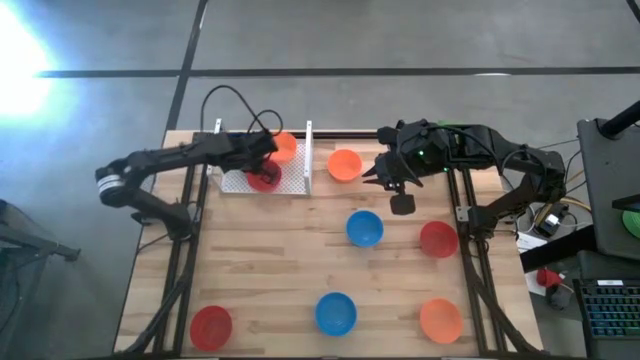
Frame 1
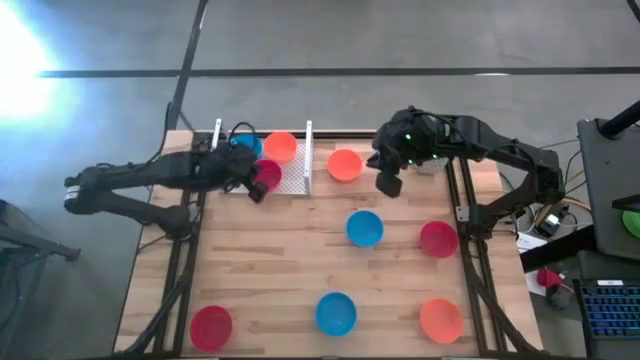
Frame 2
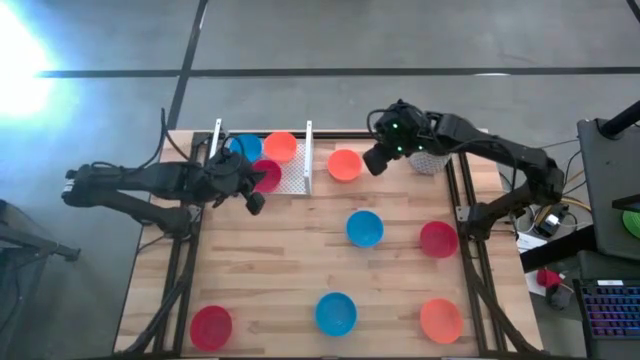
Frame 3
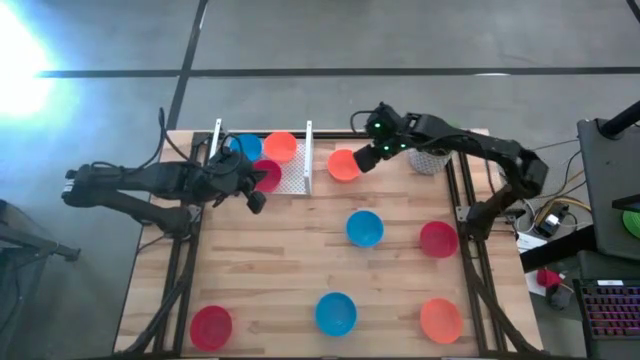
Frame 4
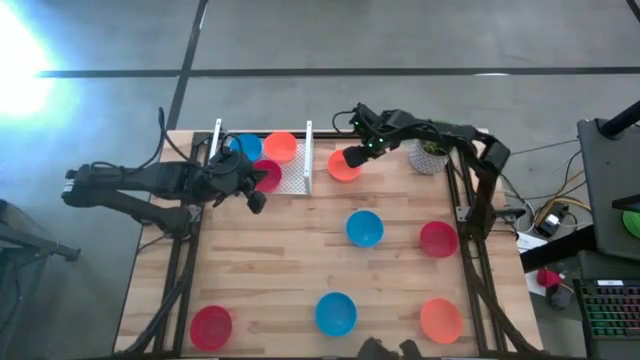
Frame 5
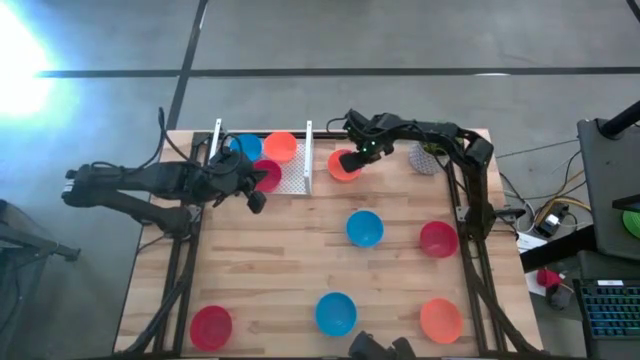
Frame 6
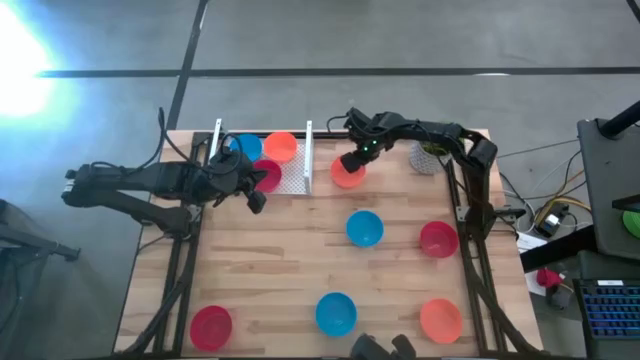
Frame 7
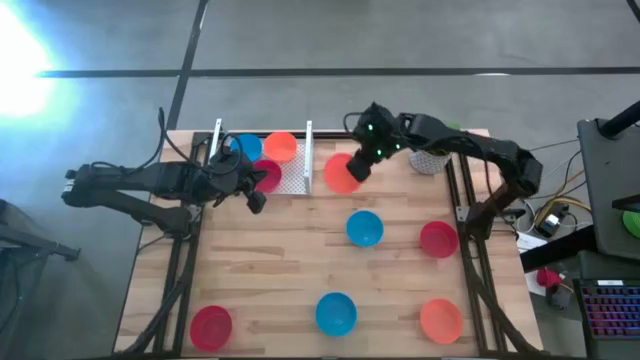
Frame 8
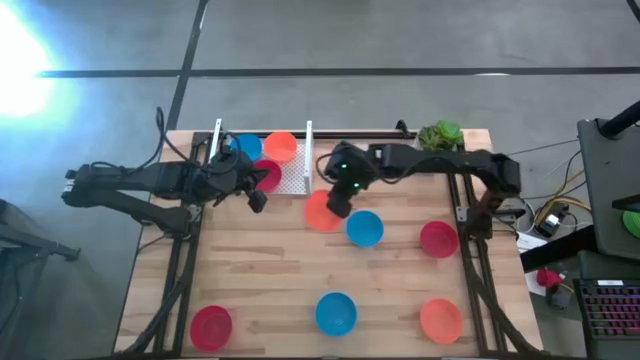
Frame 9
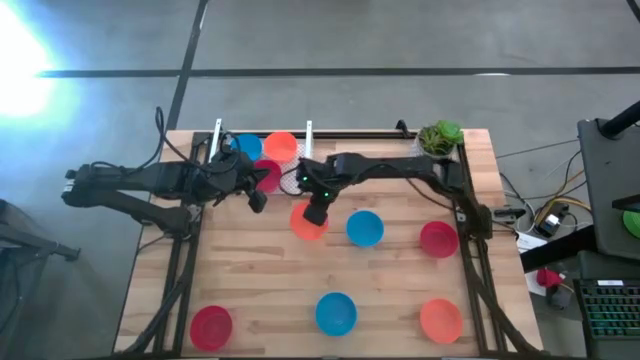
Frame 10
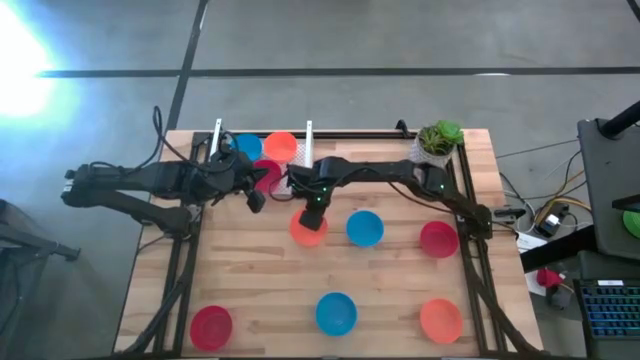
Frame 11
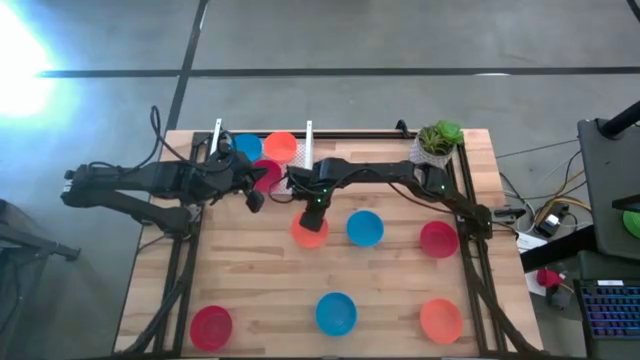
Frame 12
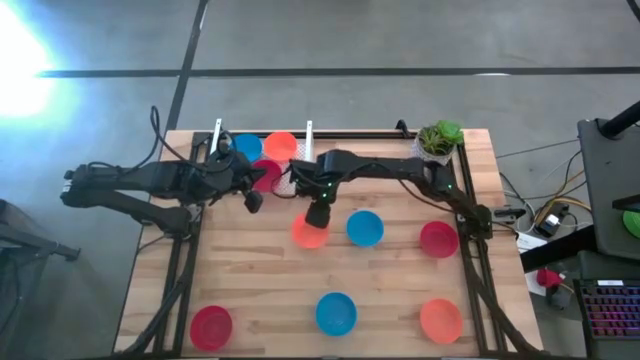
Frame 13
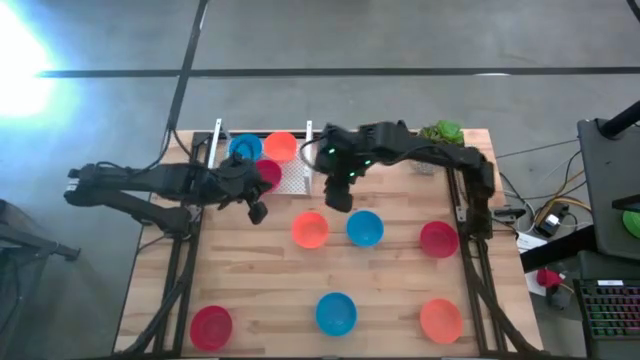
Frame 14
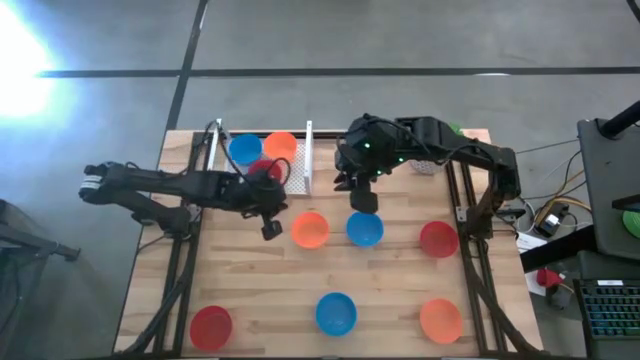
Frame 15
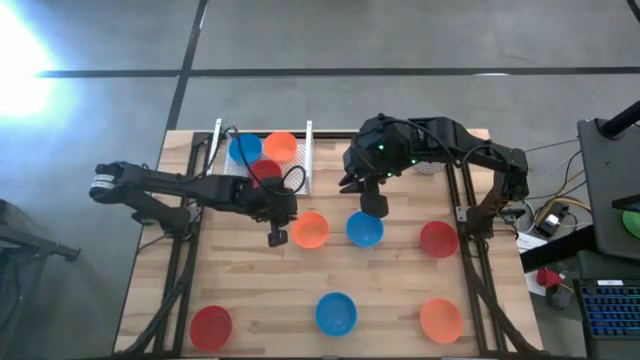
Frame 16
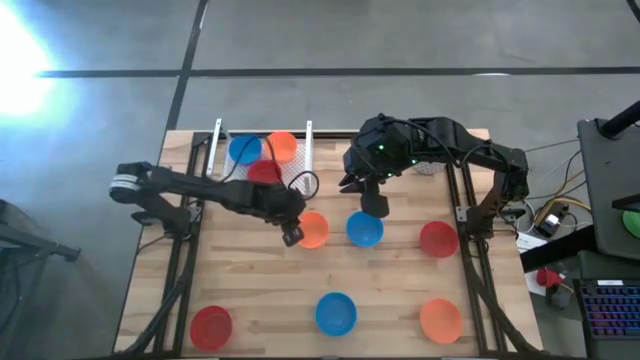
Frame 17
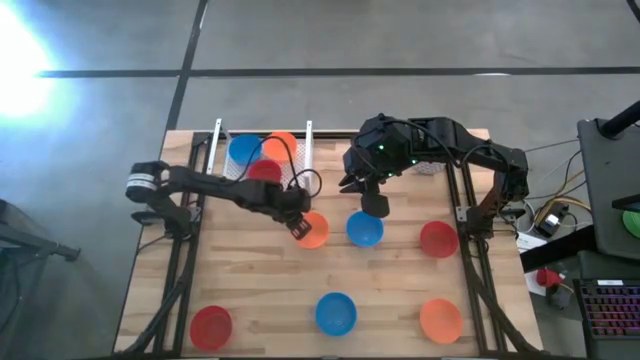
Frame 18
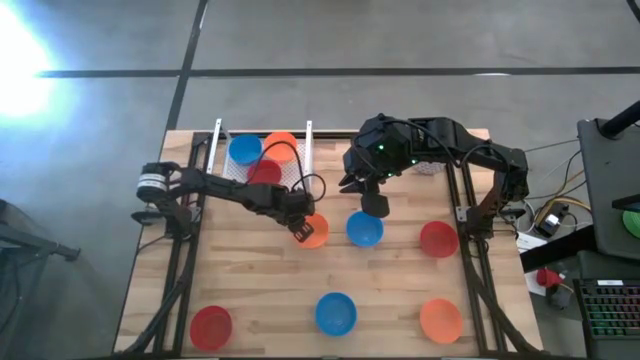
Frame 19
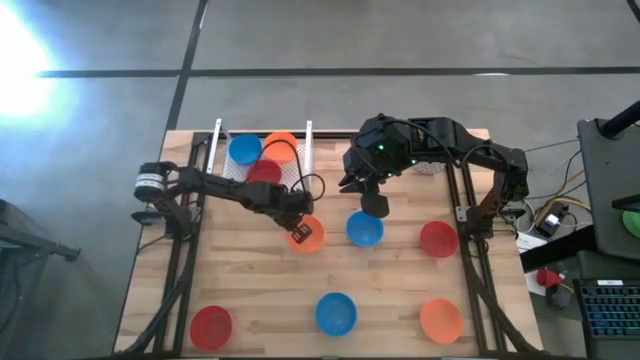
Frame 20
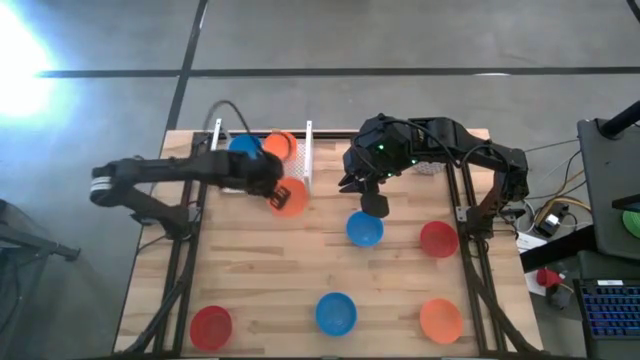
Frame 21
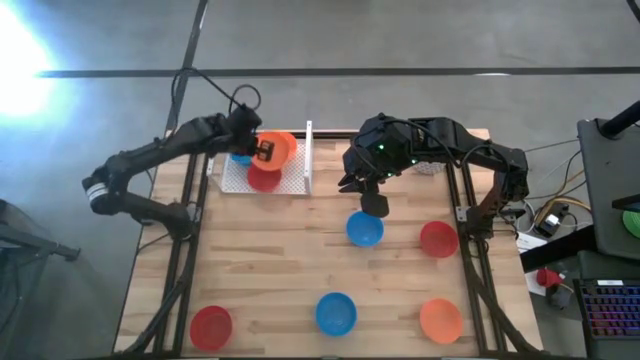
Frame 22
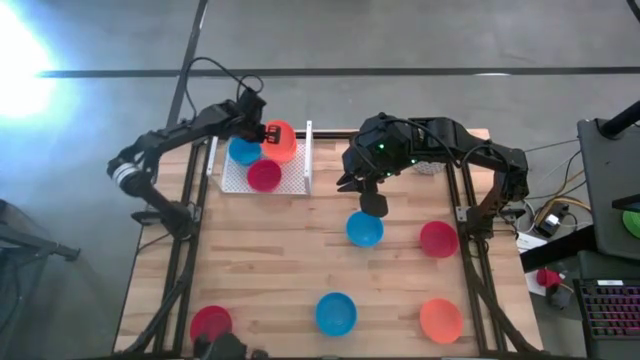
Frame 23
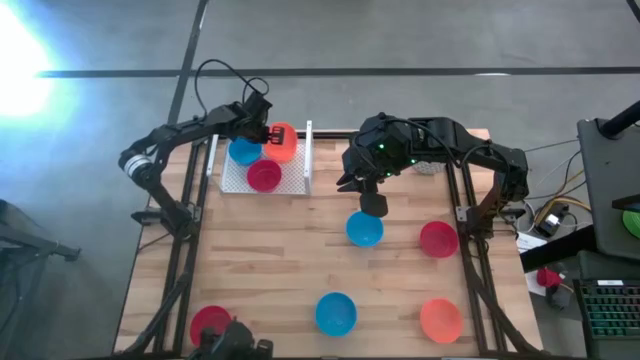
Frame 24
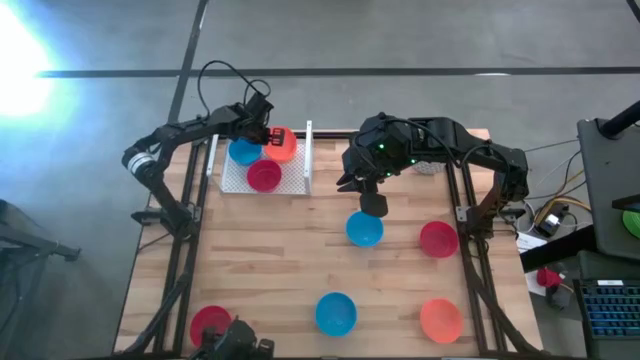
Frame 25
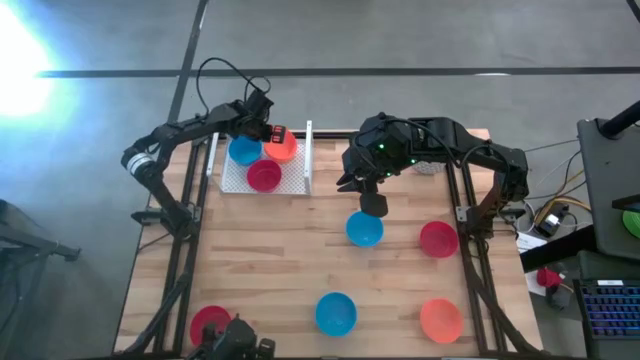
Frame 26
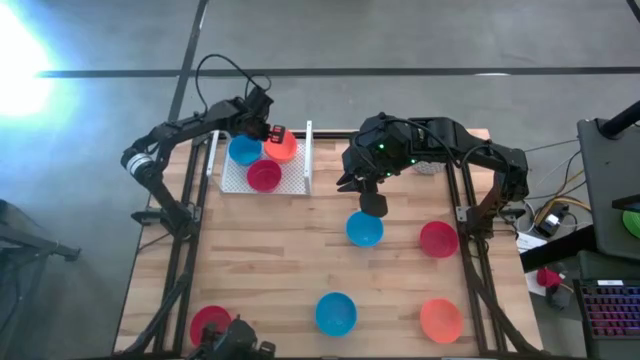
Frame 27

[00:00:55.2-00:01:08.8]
Task: Pick & Place Mini bowls
Stack the top orange bowl on the orange bowl on the shelf

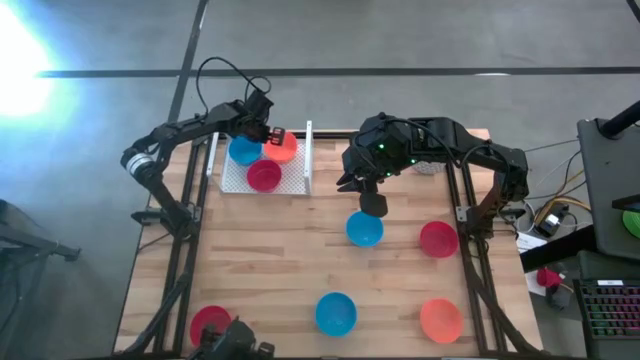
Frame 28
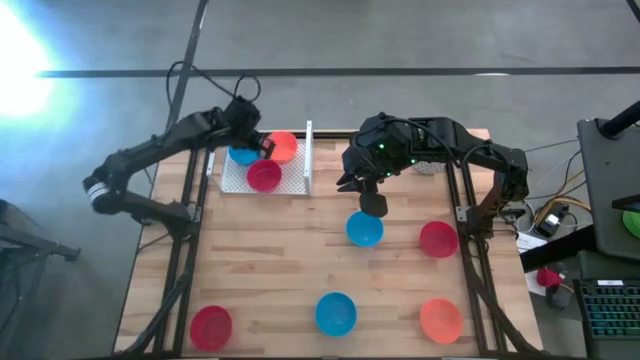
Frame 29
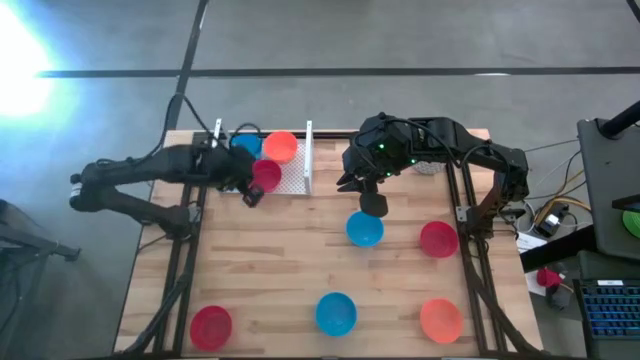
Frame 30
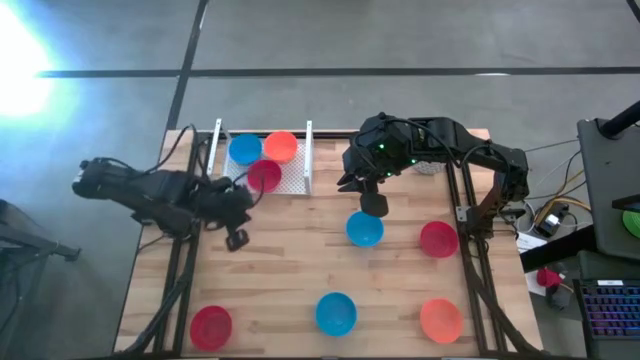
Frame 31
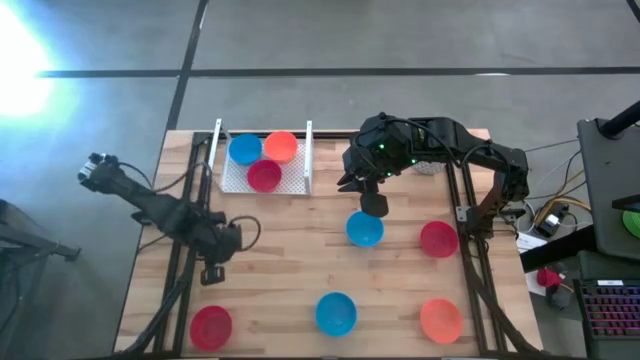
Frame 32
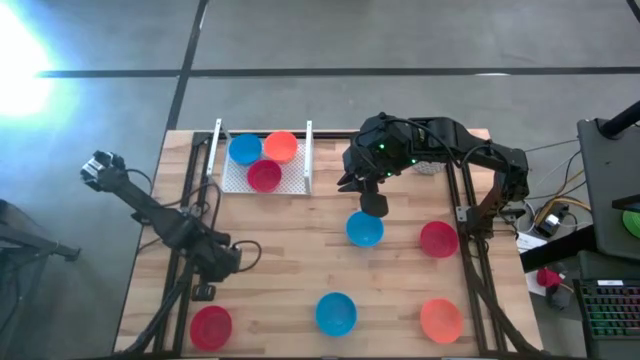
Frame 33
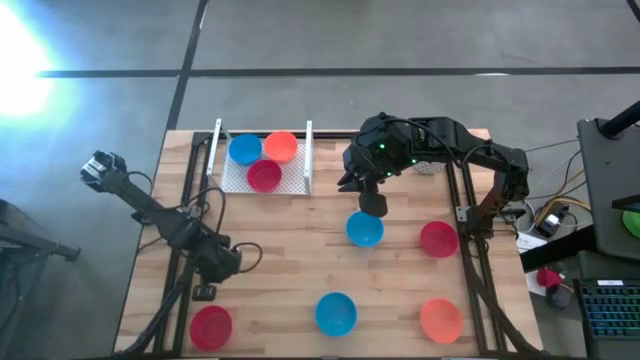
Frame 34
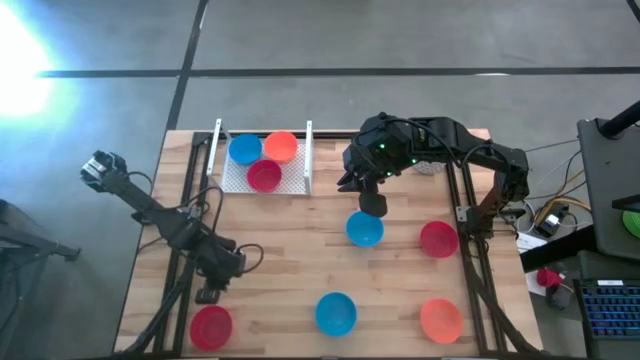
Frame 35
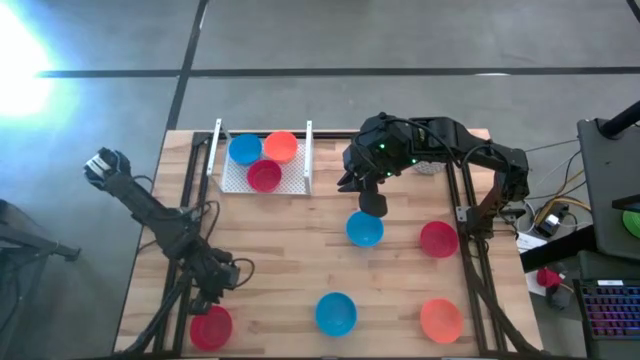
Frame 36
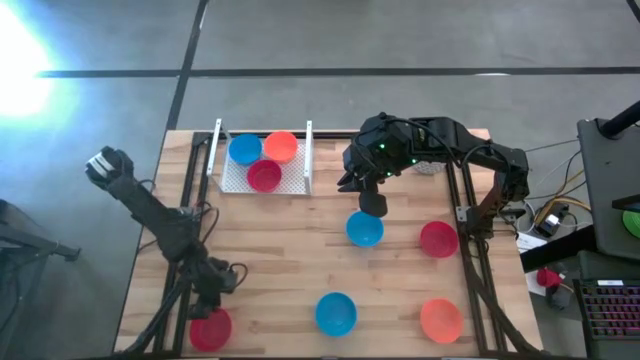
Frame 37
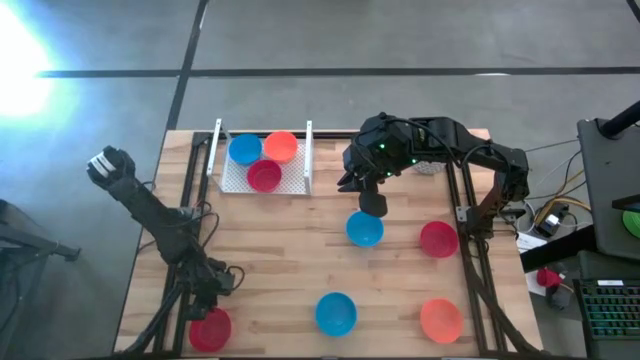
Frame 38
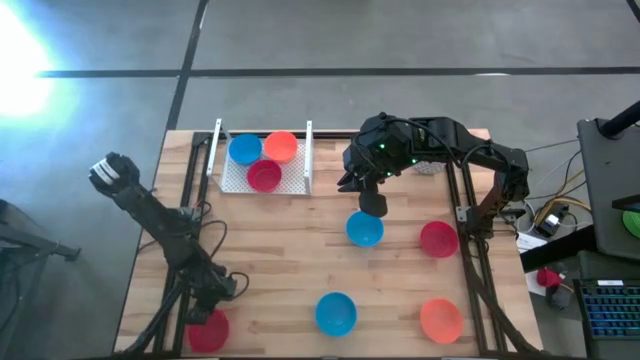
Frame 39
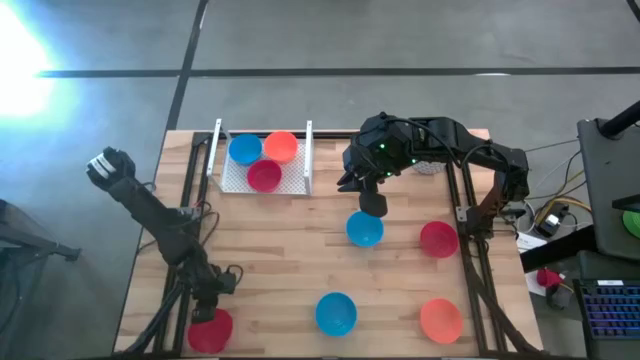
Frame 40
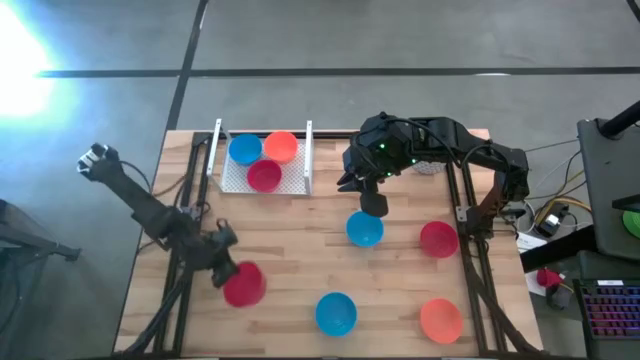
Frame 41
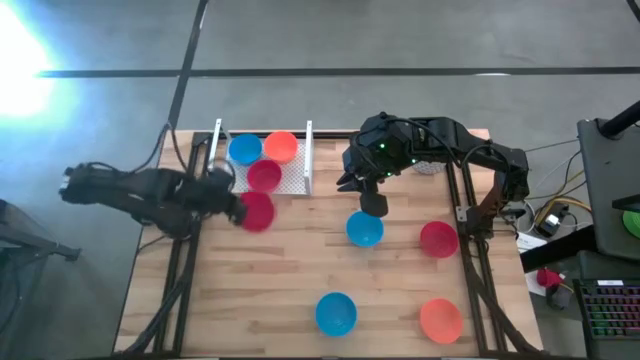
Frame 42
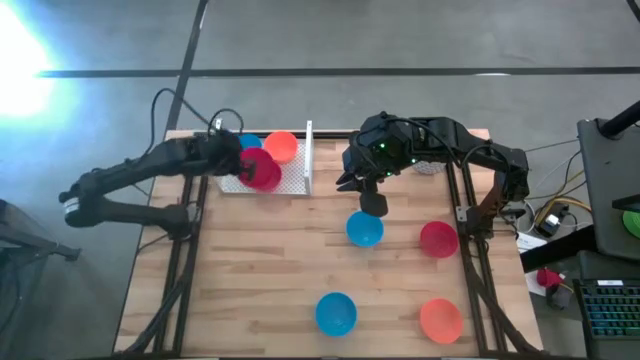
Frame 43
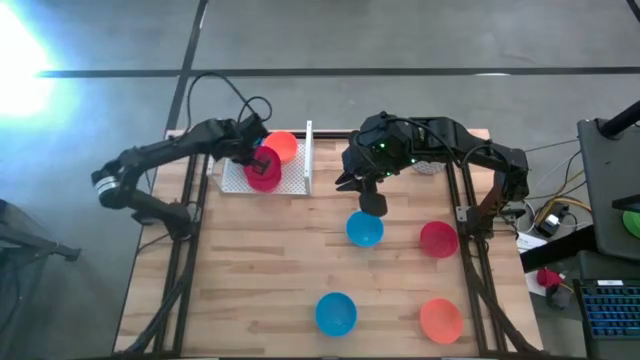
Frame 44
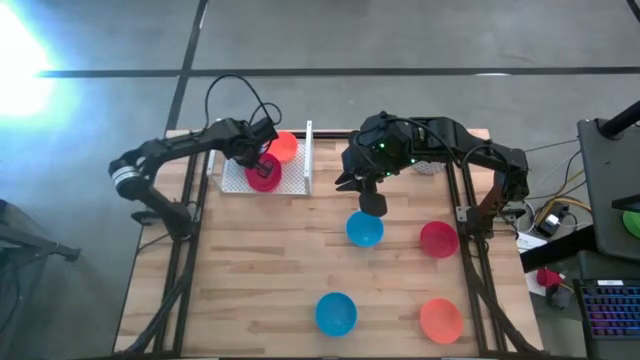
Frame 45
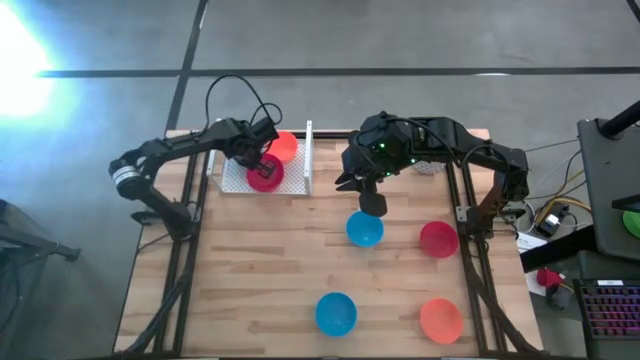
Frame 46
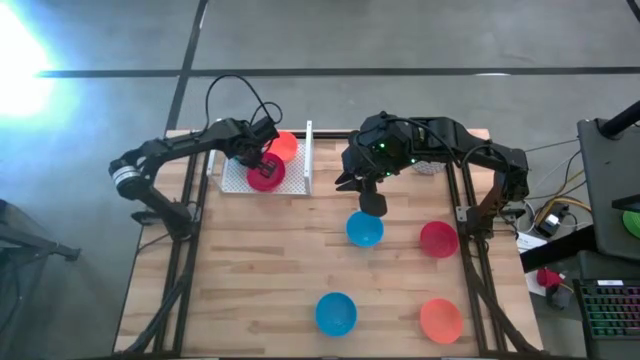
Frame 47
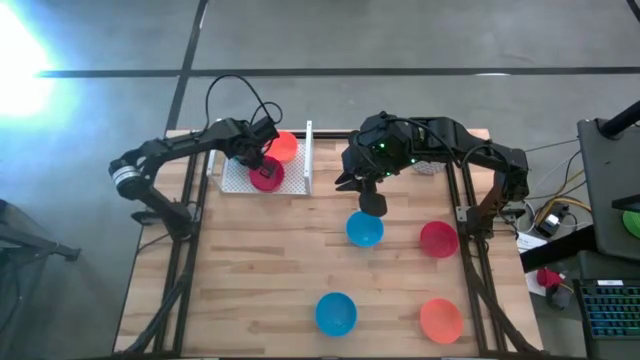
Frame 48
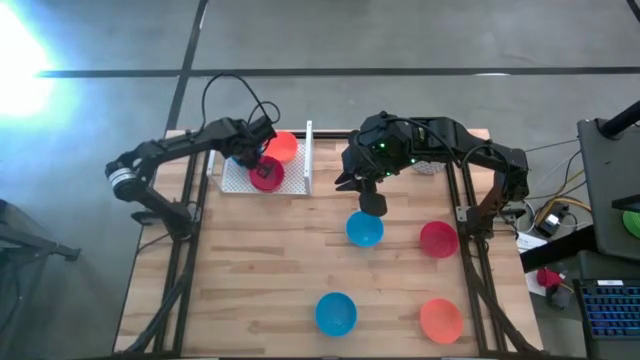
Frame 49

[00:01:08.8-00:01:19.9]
Stack the left red bowl on the red bowl on the shelf
